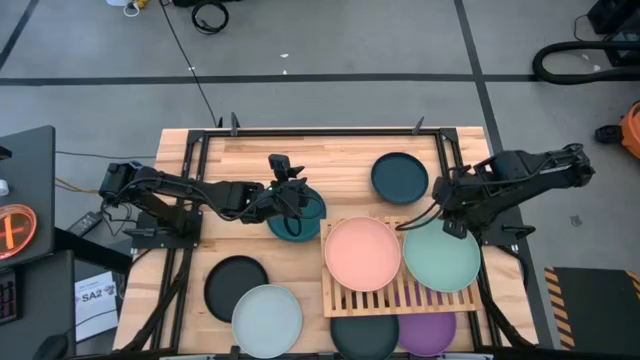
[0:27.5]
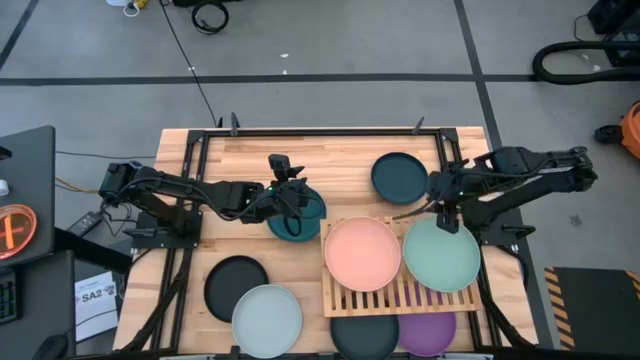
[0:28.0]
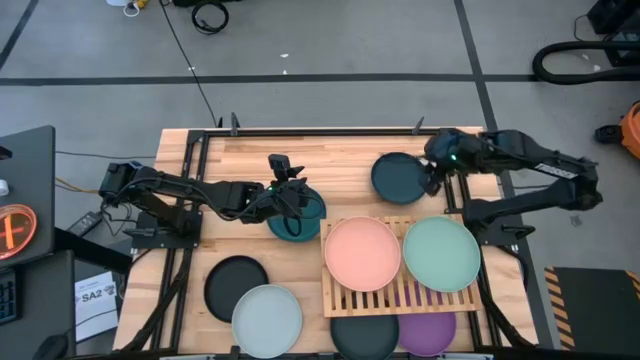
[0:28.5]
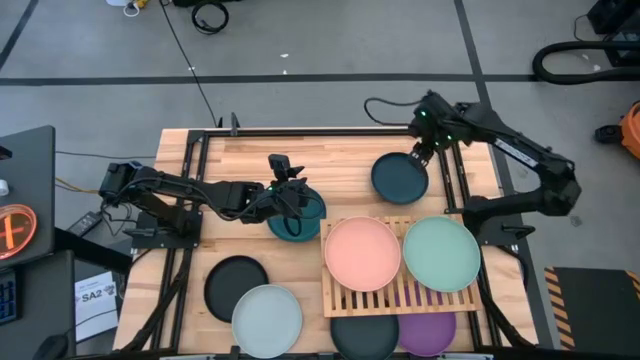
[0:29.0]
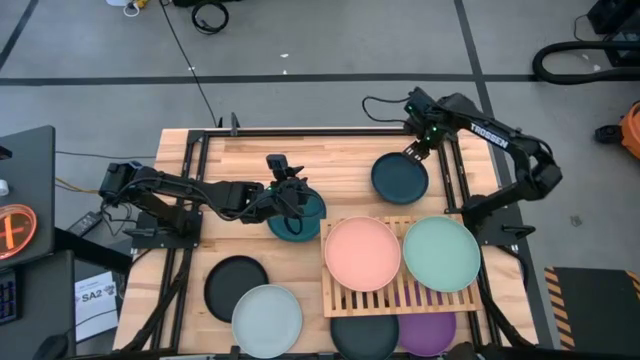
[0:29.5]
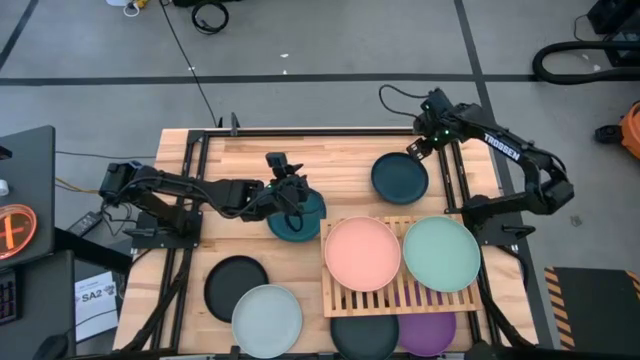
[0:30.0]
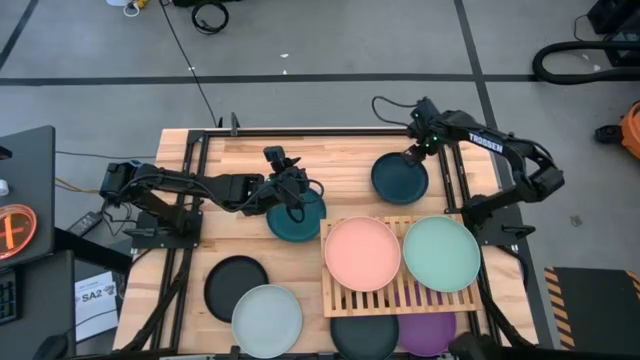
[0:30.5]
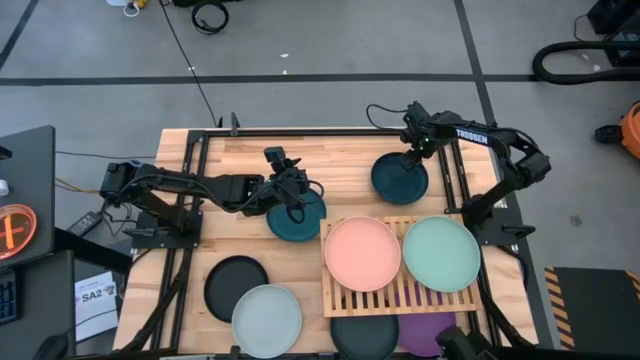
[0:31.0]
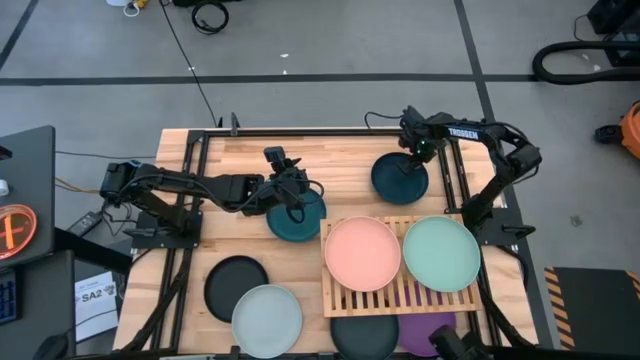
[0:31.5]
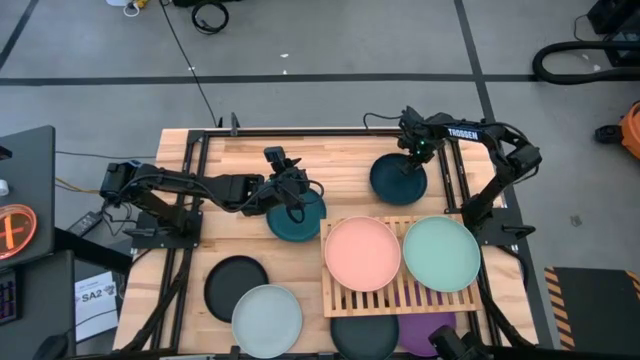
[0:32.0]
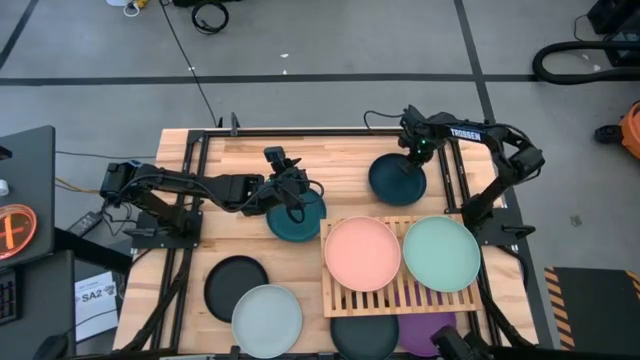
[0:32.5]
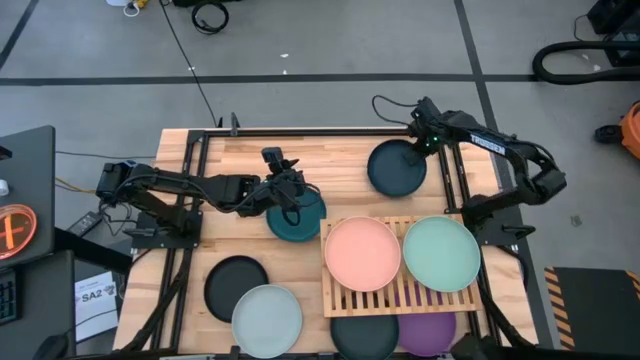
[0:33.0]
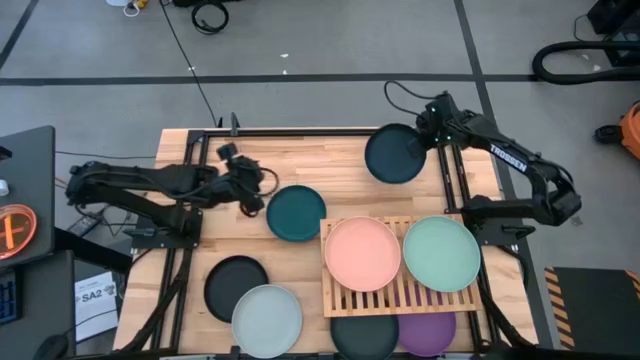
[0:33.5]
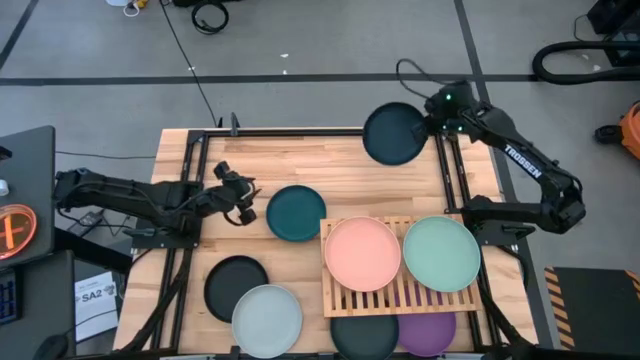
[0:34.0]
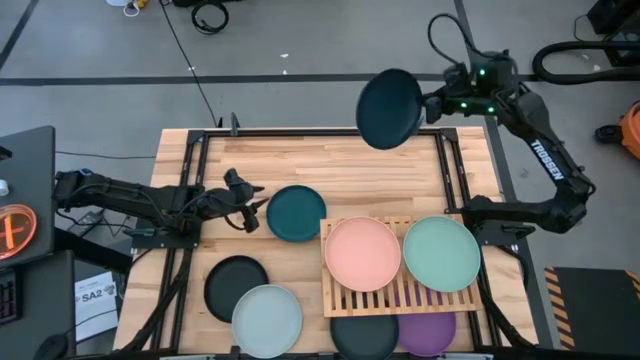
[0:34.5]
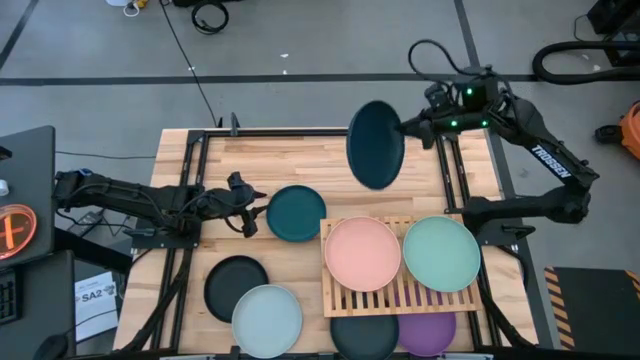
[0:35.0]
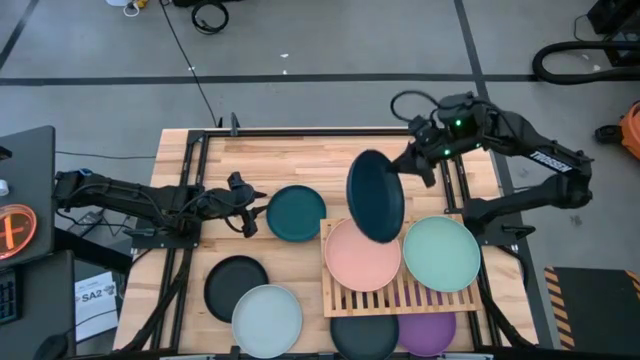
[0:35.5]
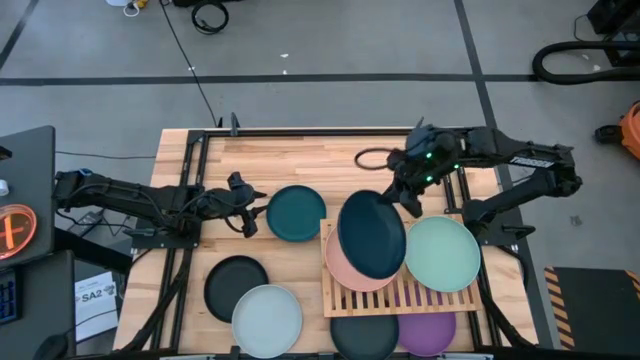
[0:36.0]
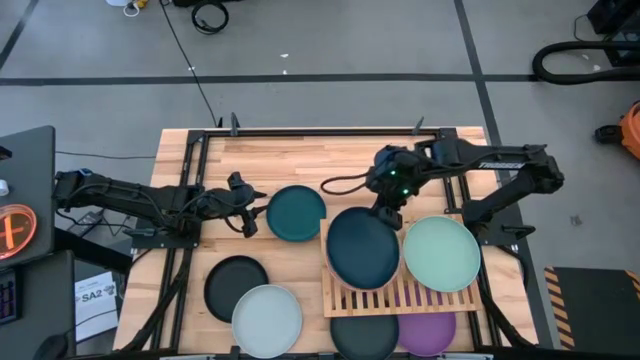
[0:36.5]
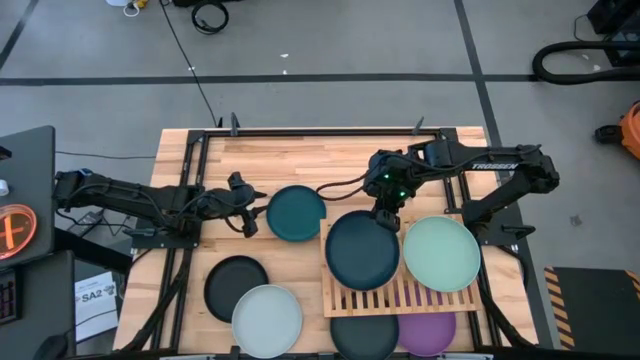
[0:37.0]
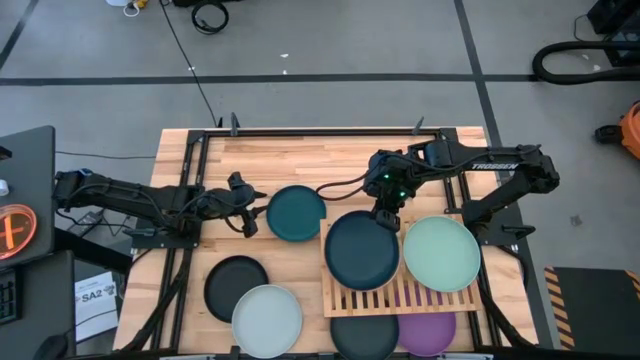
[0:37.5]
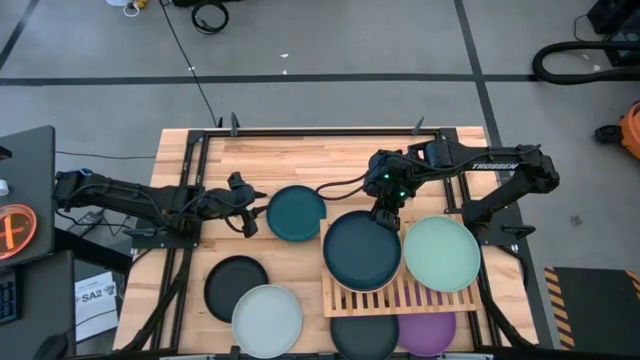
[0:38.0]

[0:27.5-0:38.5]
Task: Place and stack plates onto a shelf
Stack the dark blue plate on top of the pink plate

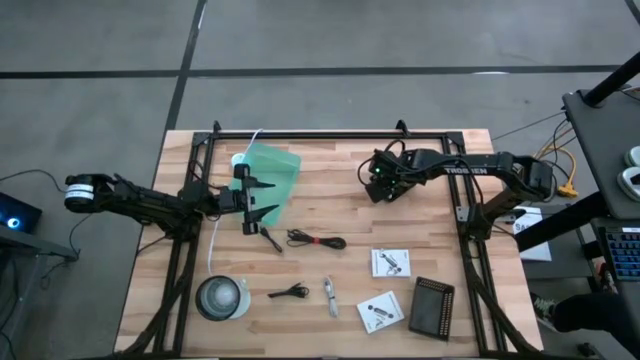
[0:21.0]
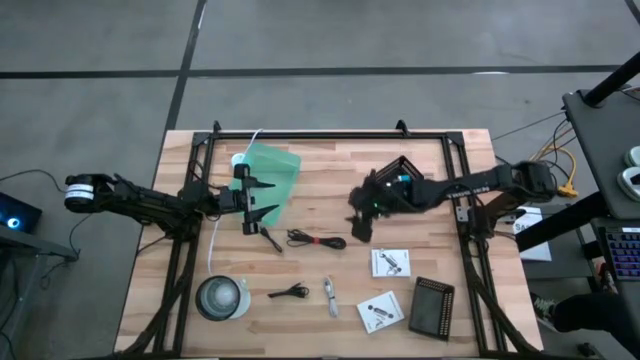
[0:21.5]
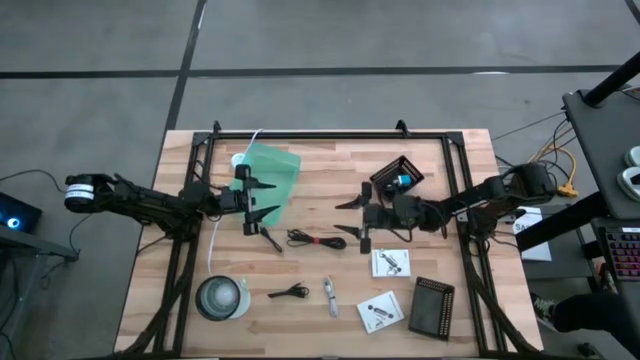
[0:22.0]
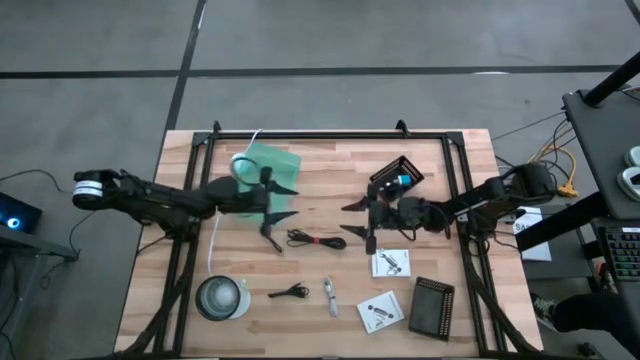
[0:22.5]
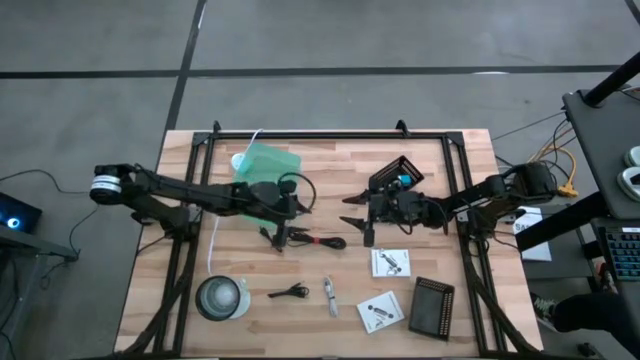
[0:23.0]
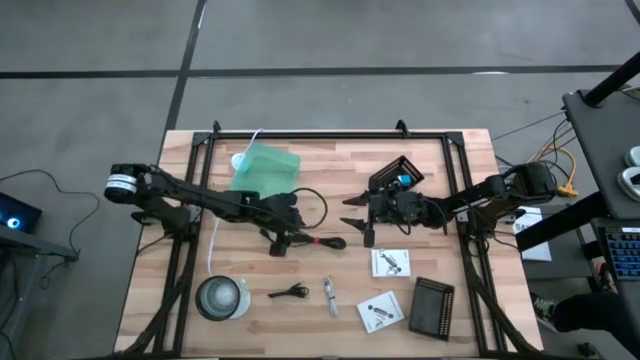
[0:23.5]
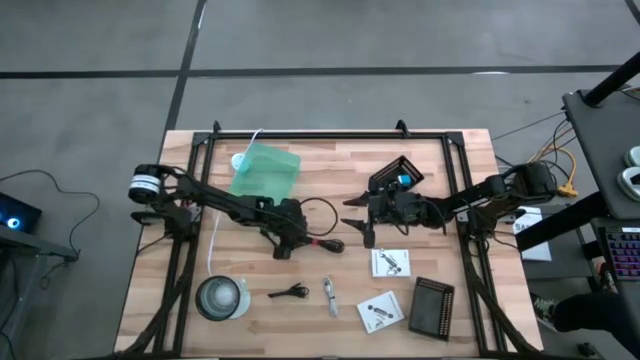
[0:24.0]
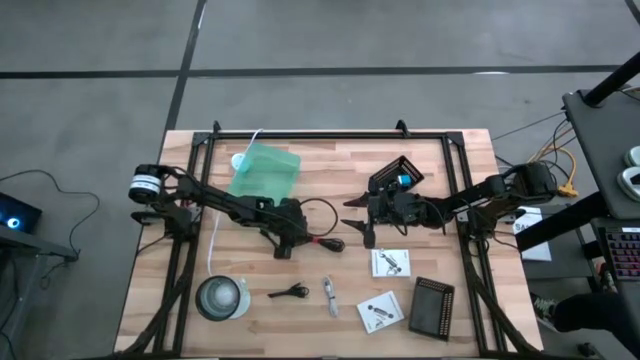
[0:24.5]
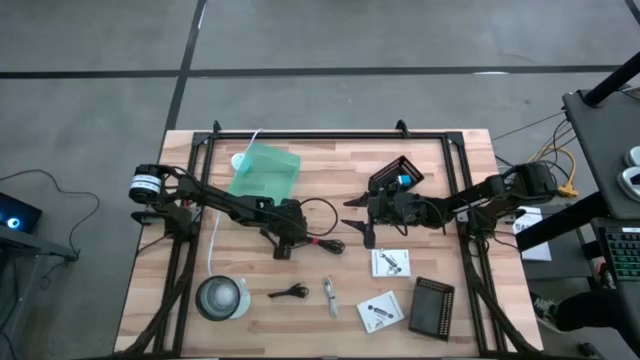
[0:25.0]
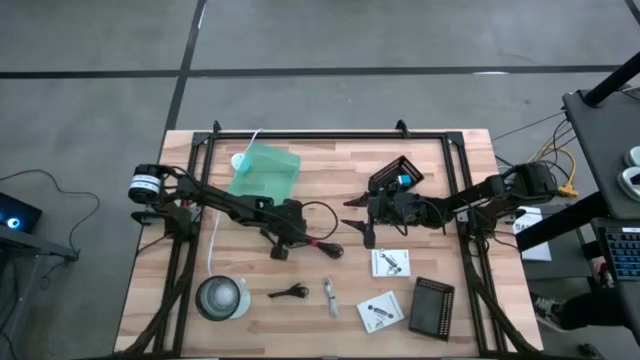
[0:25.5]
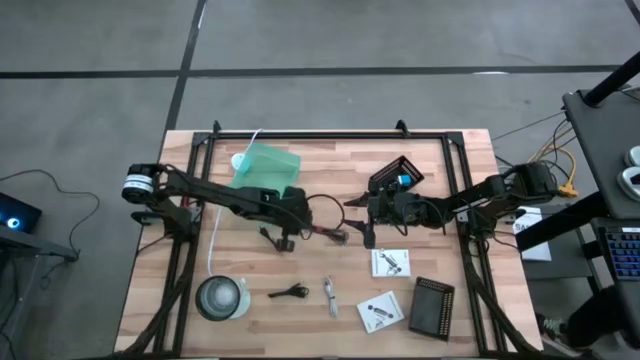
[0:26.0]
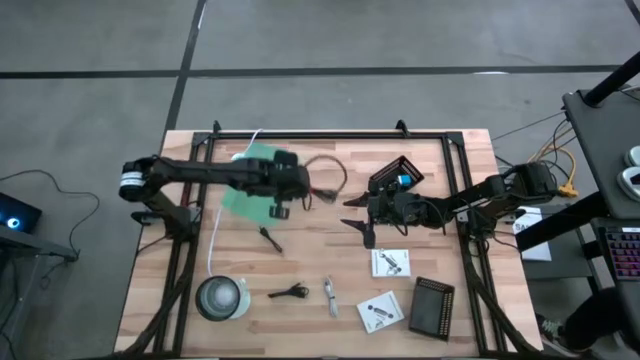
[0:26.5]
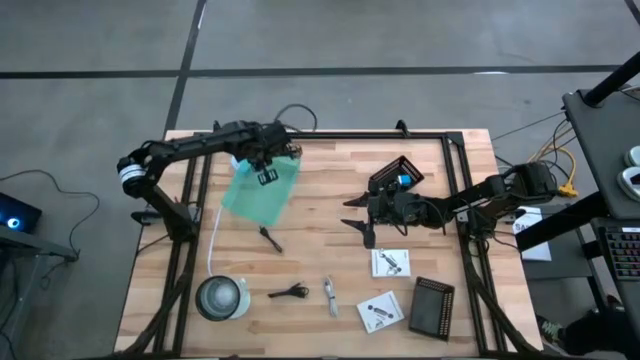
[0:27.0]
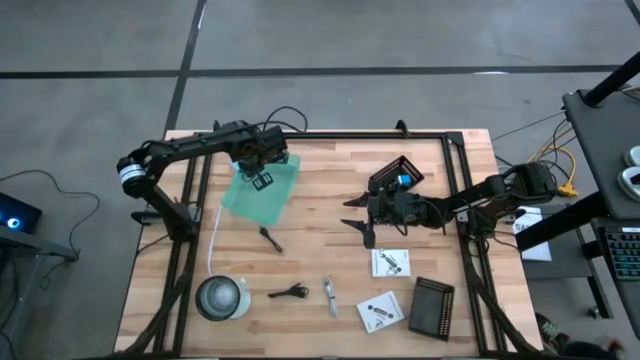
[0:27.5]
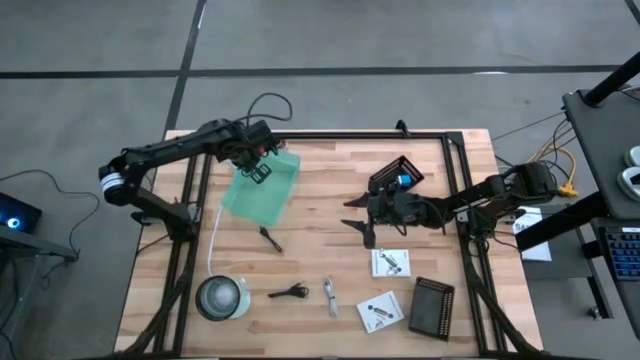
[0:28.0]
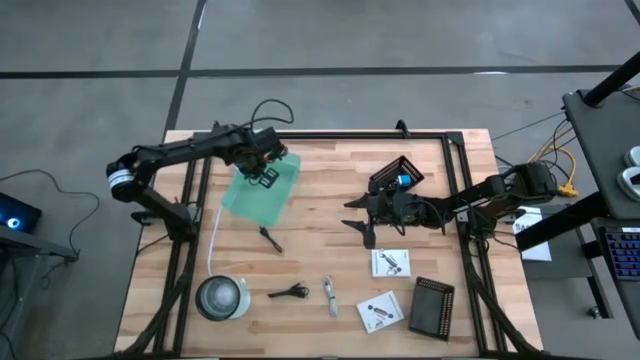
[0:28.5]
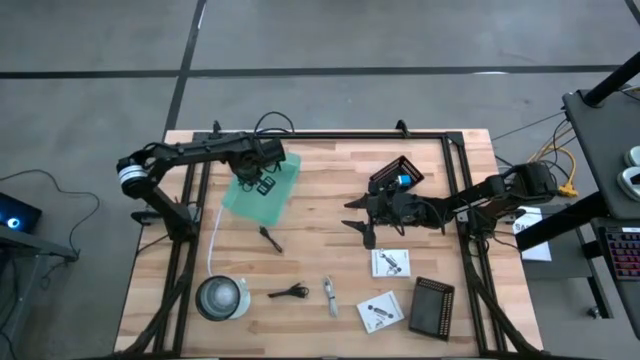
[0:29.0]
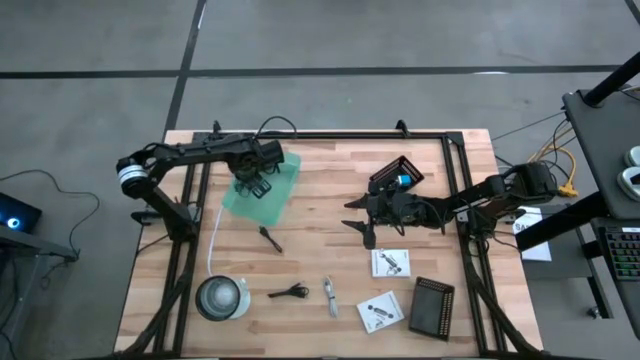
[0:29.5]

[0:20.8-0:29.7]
Task: Pick and place items into bin
Put the top right black charger cable into the light blue bin

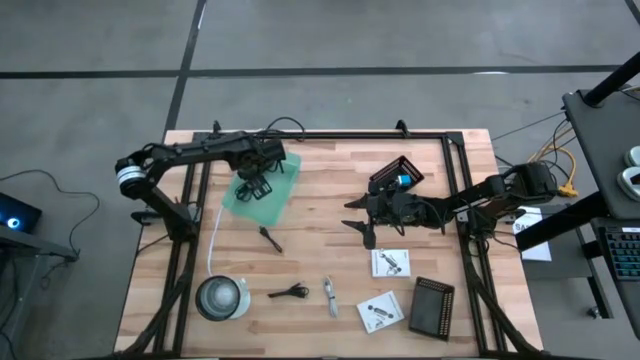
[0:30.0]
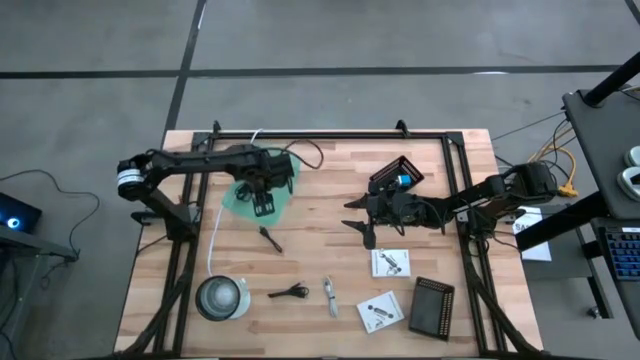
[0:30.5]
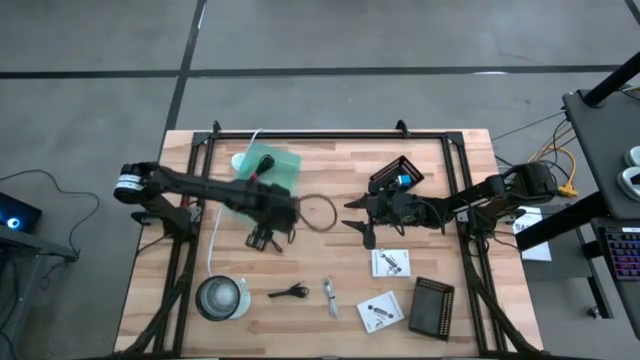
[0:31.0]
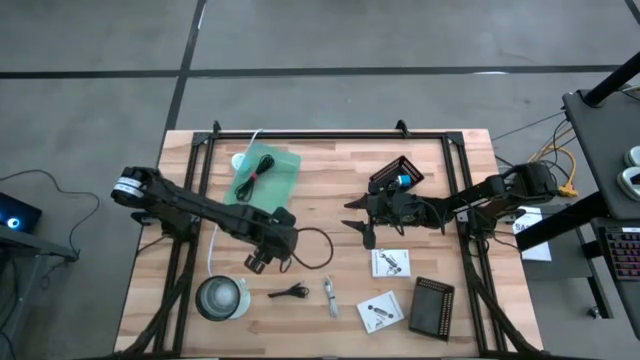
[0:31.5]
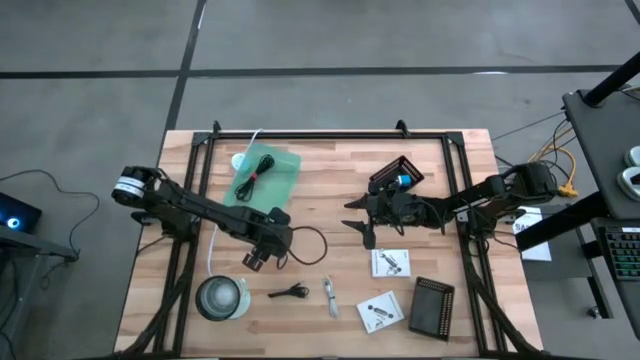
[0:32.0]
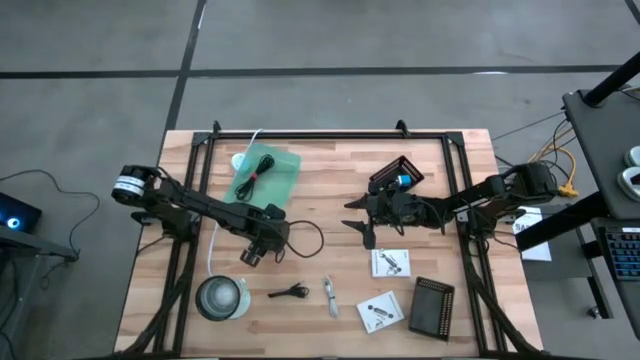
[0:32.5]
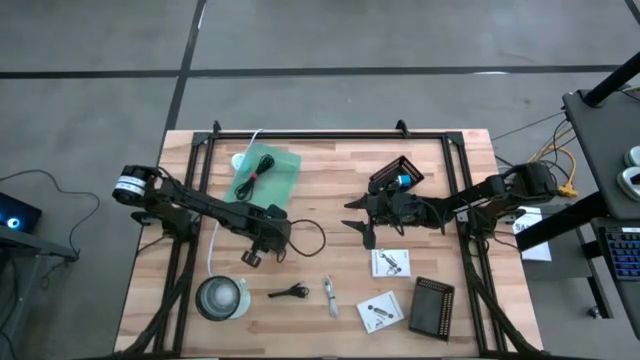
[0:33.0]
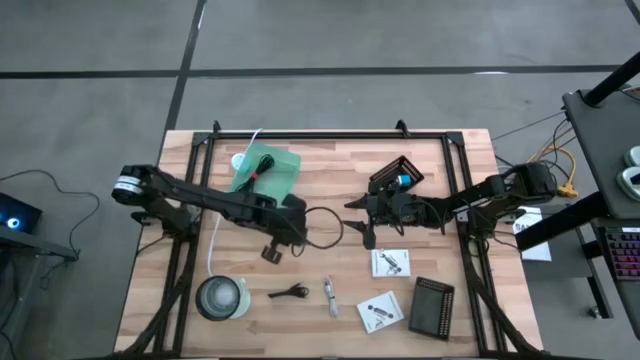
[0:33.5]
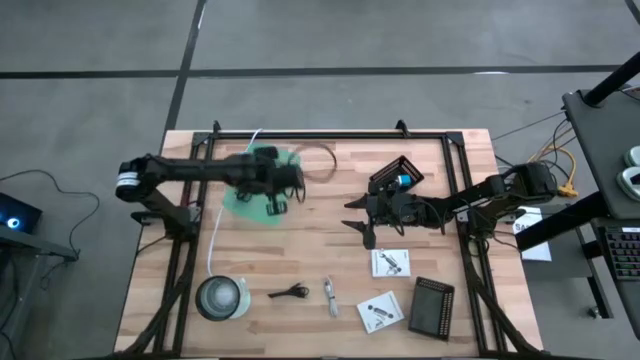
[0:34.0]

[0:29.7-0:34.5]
Put the top black charger cable into the light blue bin
